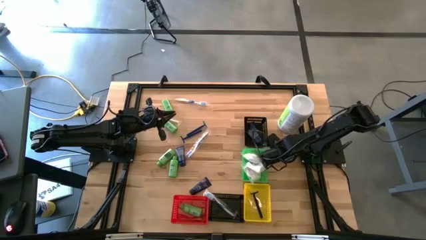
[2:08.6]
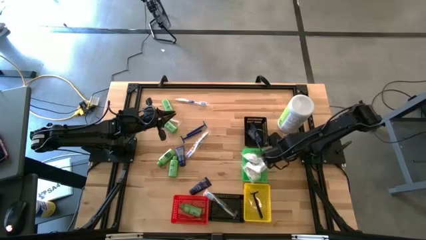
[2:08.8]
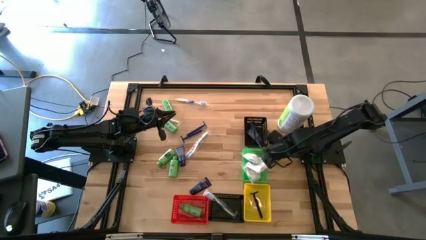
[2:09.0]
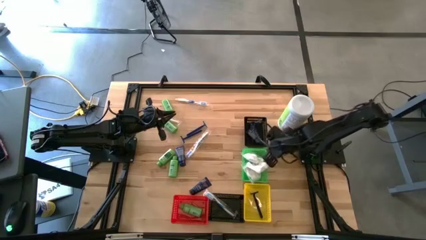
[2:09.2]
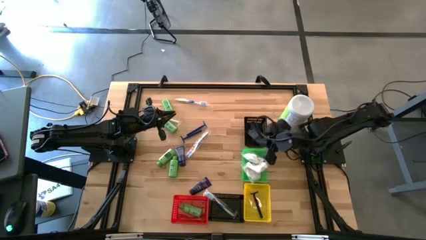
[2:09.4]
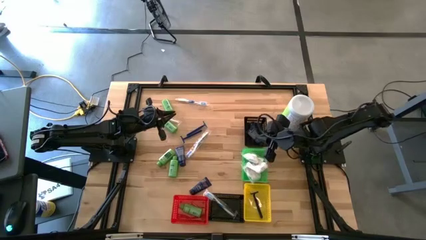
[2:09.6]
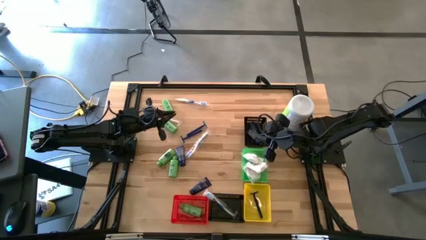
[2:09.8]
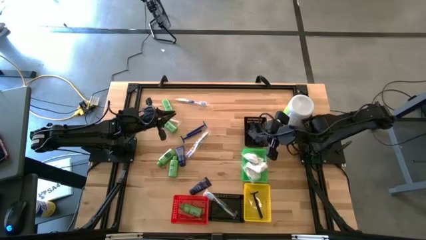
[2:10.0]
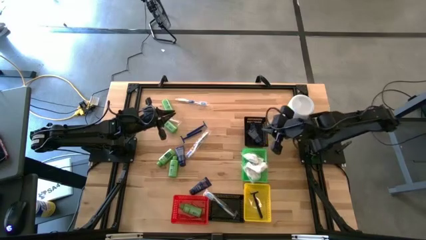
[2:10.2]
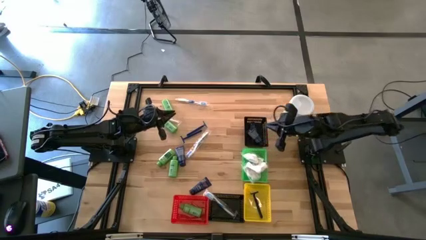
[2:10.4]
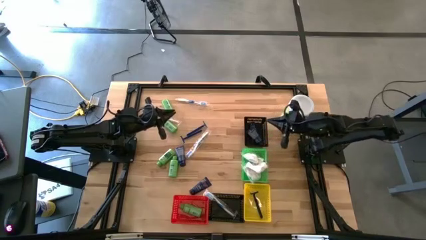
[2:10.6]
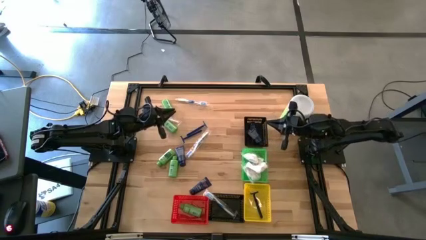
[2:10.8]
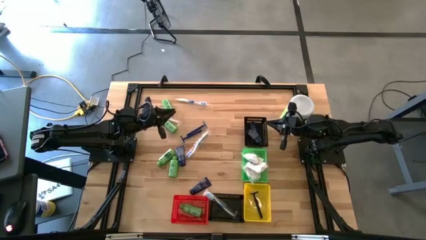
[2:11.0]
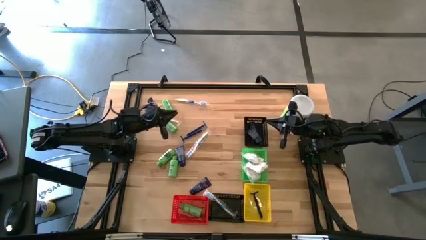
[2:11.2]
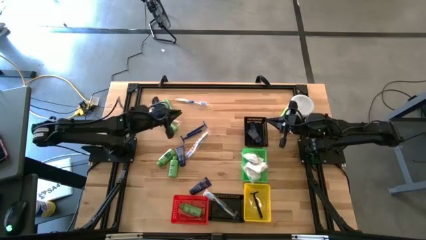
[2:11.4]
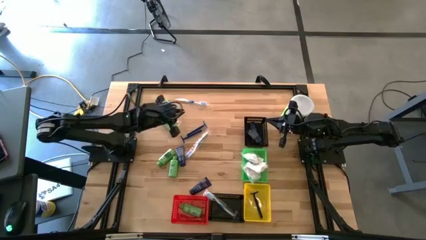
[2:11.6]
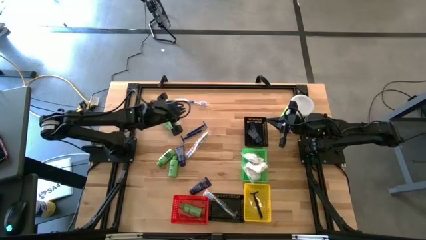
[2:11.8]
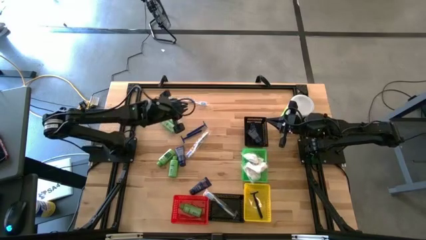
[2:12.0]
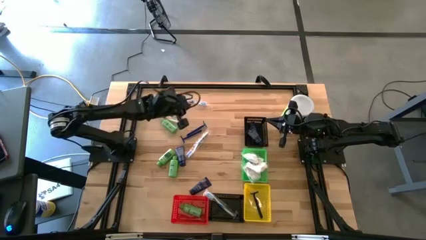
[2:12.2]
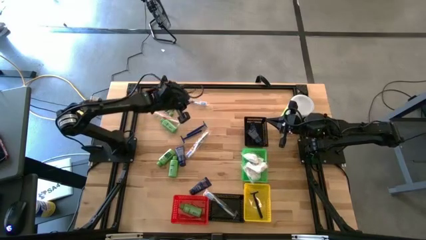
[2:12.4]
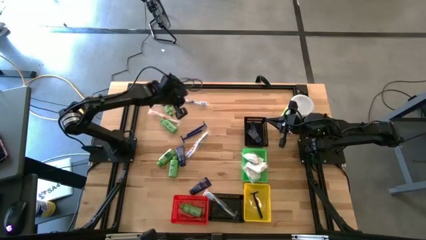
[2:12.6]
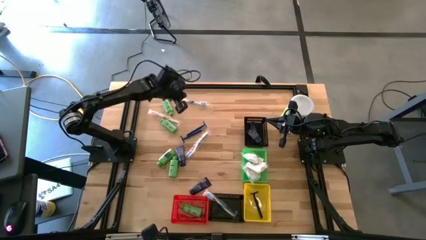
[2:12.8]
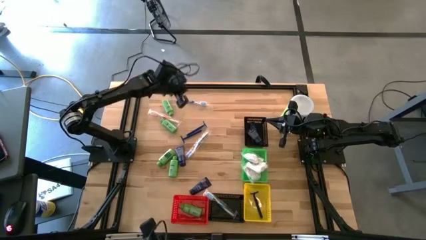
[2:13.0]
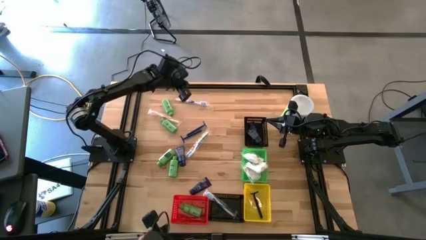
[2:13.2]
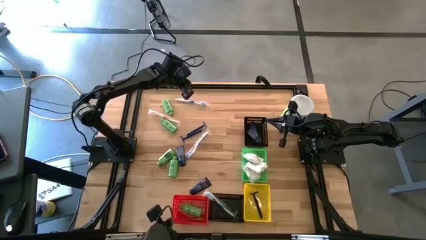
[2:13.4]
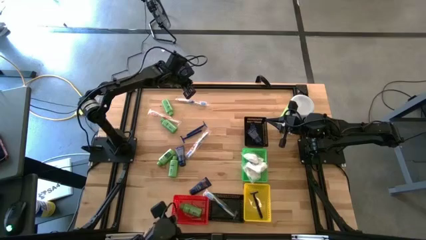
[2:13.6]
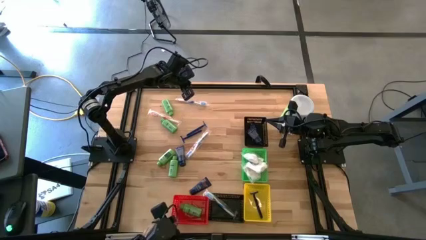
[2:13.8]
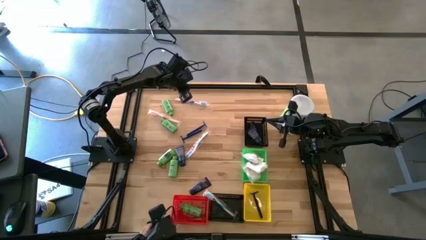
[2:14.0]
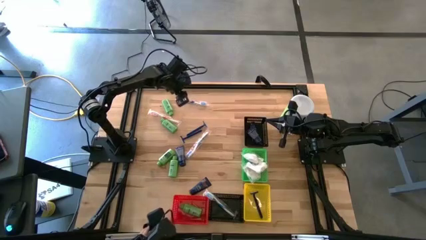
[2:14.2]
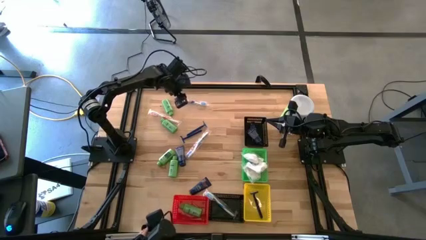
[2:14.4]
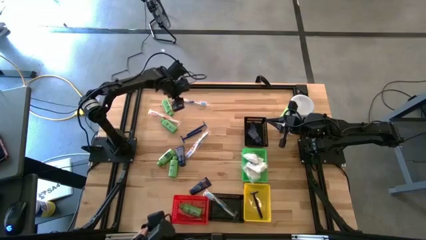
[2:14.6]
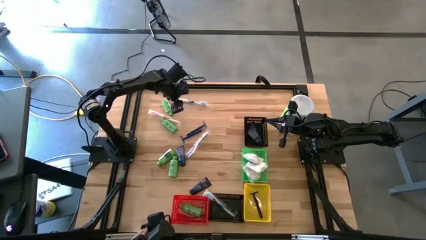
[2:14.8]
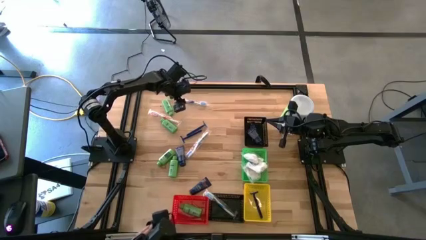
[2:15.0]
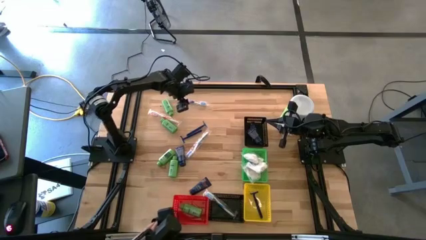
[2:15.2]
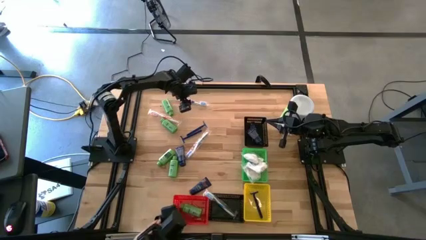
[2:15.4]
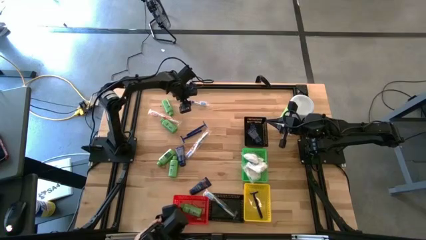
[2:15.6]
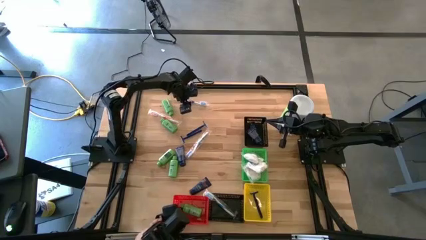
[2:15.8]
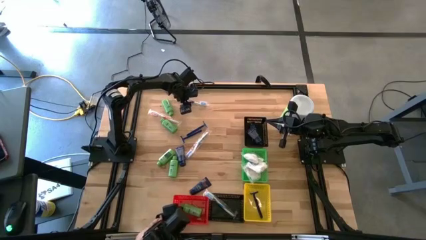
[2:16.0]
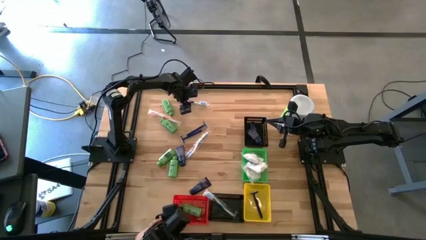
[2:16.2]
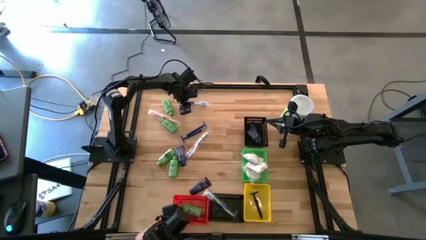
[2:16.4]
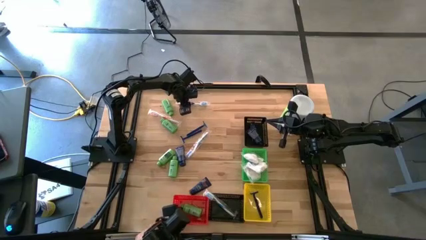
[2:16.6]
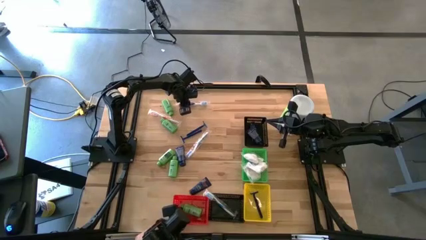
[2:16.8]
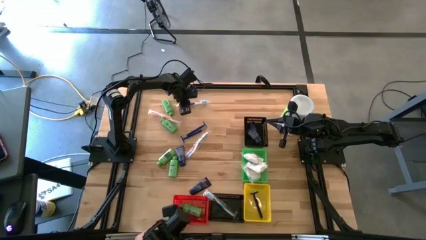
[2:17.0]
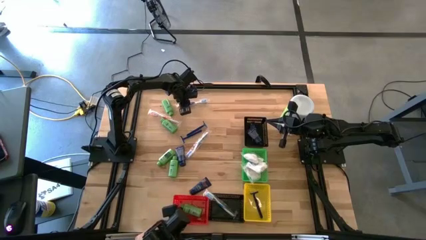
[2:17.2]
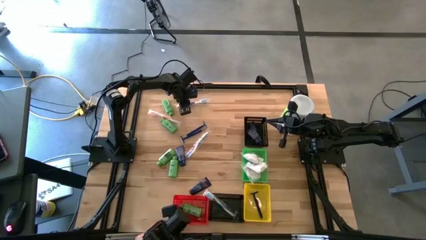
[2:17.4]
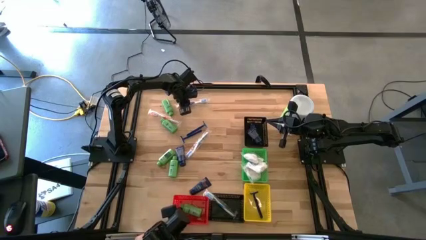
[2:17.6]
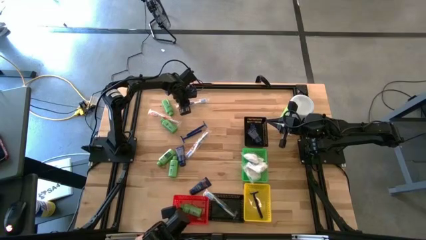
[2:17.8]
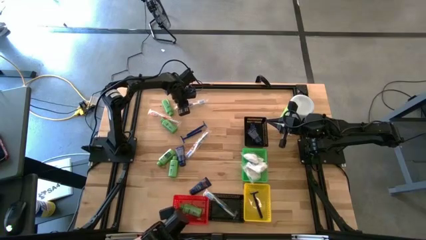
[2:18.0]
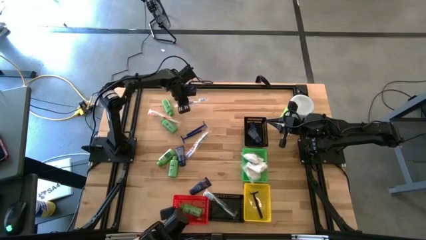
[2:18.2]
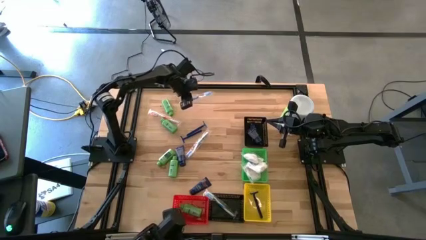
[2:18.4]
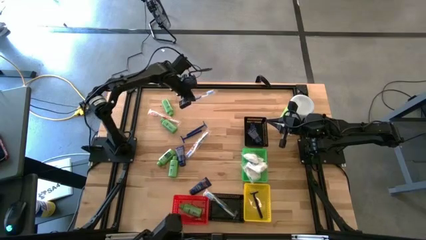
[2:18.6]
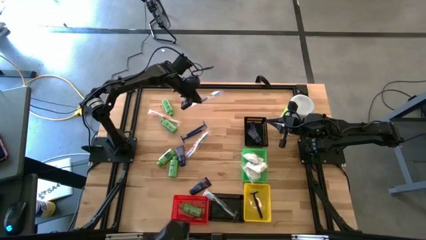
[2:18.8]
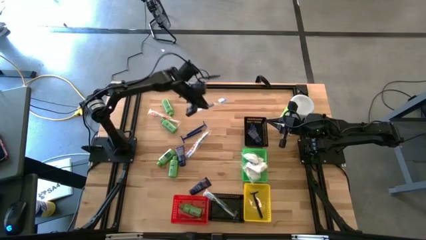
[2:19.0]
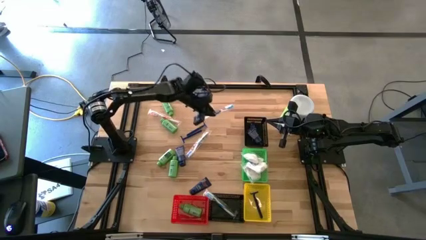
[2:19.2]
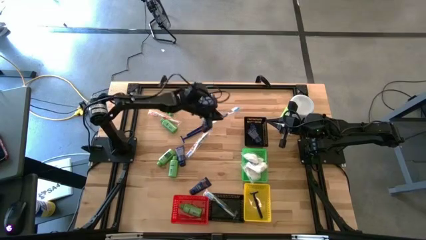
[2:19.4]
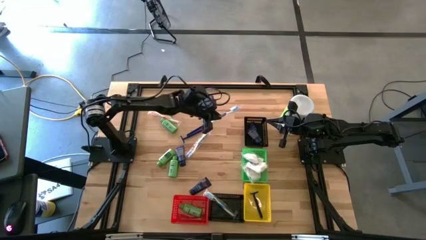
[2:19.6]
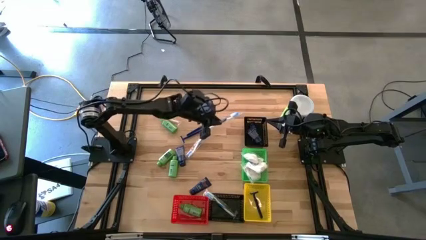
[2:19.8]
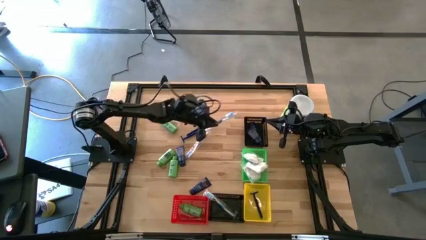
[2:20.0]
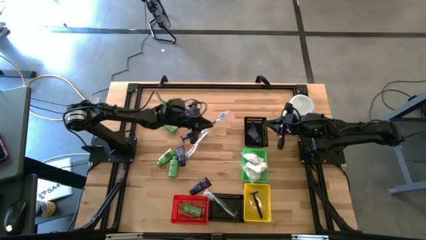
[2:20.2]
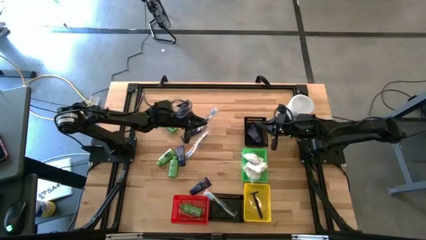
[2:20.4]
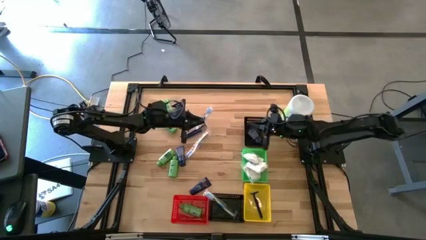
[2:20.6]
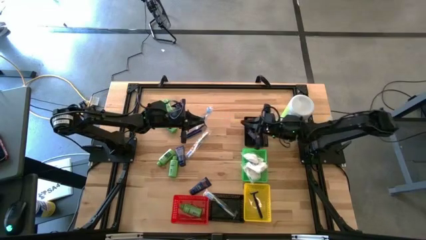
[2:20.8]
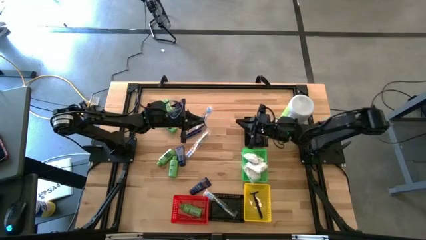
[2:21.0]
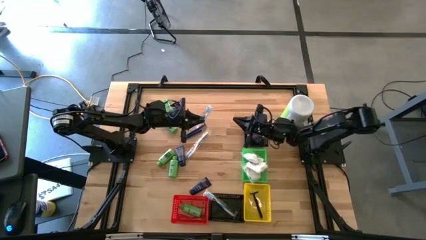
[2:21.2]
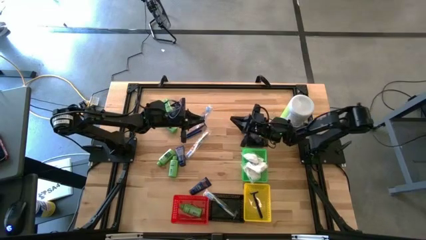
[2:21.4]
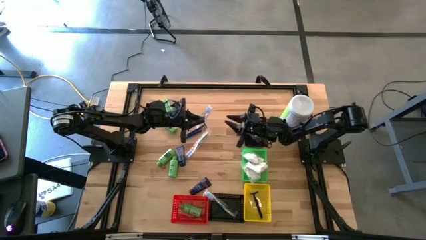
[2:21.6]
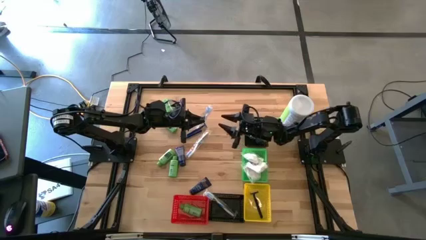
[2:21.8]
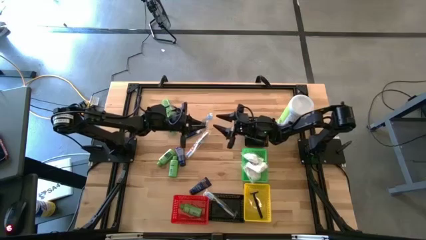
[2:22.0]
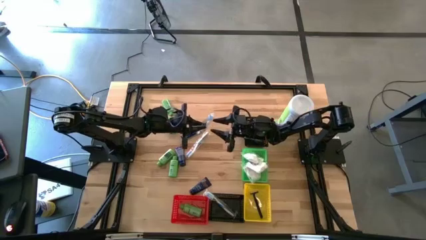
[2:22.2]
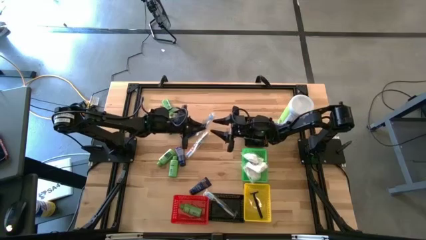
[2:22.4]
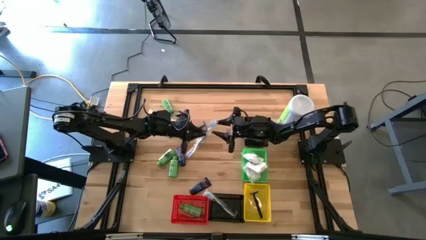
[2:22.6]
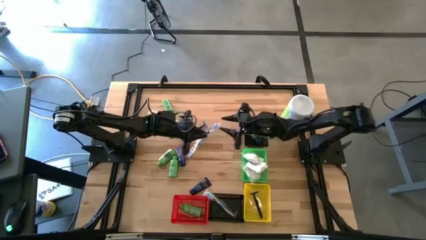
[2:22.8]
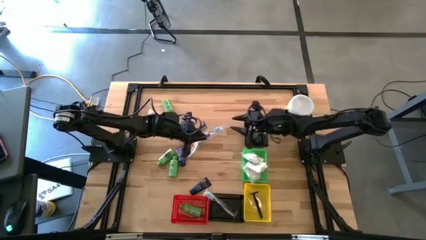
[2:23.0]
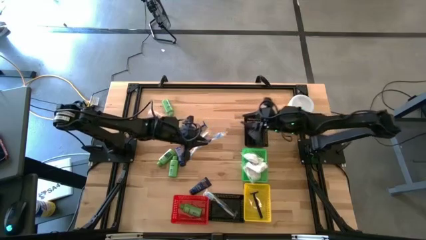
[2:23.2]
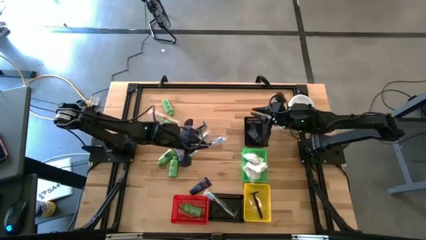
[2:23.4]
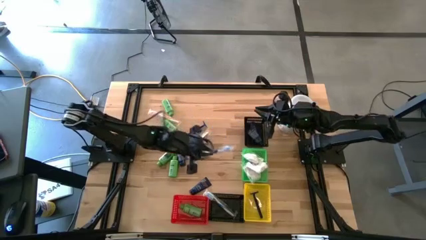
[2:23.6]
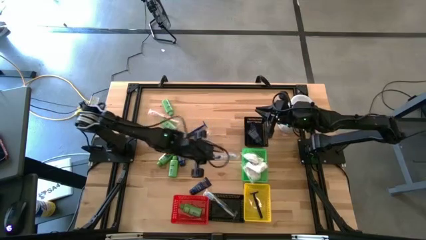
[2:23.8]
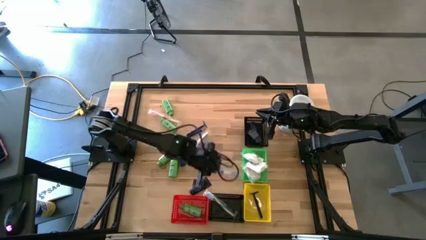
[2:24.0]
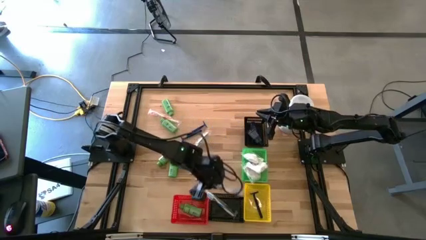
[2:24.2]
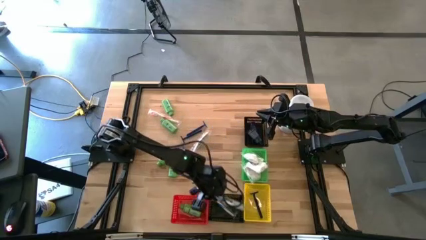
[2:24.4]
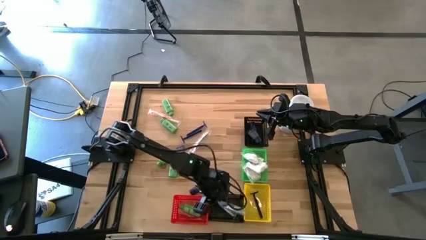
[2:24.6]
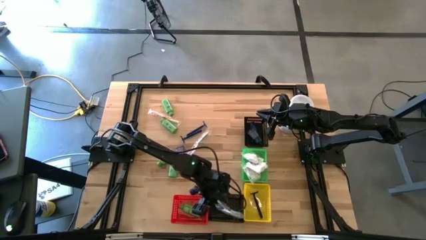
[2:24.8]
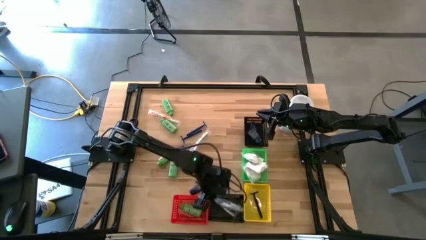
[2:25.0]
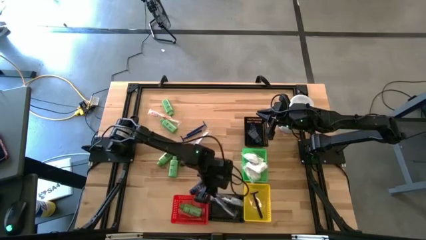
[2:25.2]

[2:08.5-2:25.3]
Task: Pick & Place Travel size toiletries
Put the dark blue toothbrush into the bottom black bin
